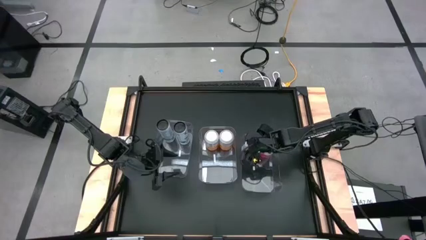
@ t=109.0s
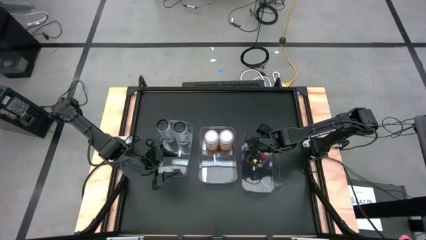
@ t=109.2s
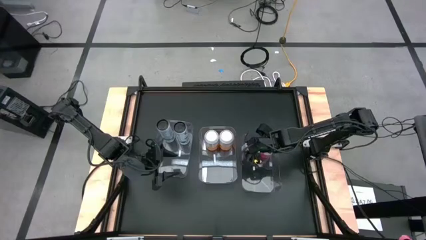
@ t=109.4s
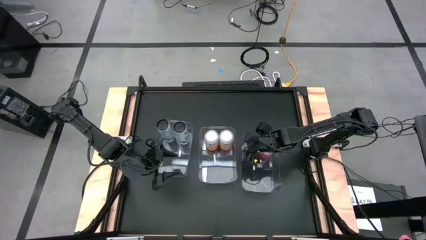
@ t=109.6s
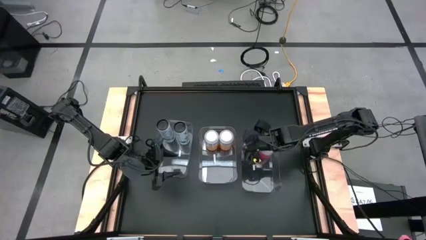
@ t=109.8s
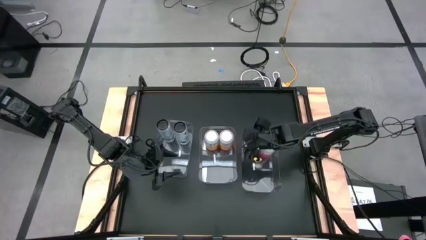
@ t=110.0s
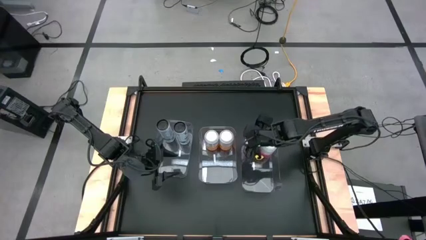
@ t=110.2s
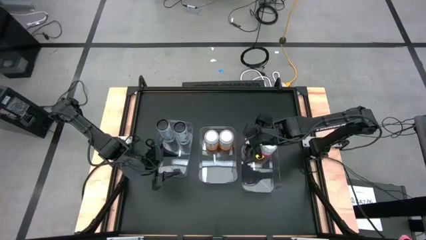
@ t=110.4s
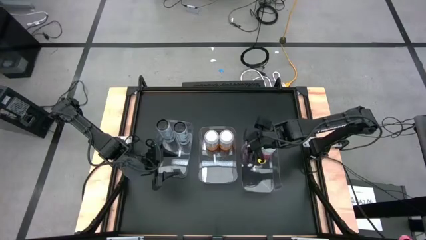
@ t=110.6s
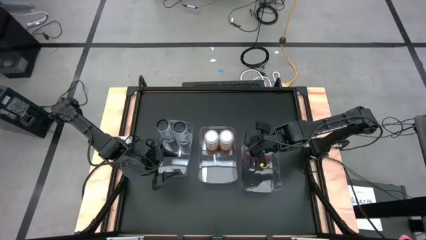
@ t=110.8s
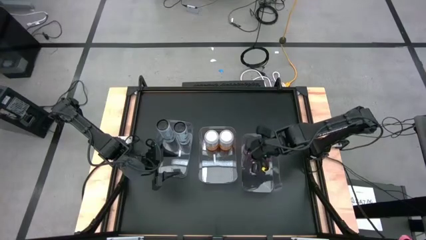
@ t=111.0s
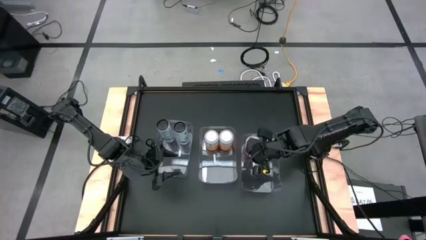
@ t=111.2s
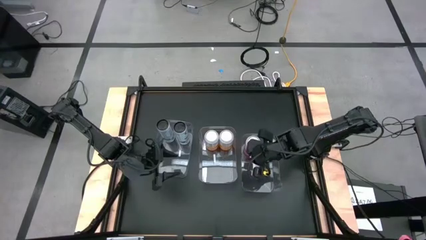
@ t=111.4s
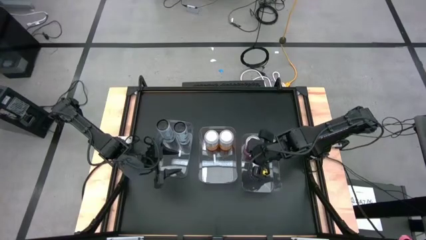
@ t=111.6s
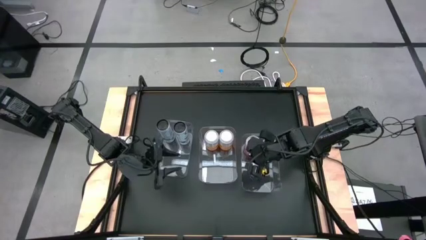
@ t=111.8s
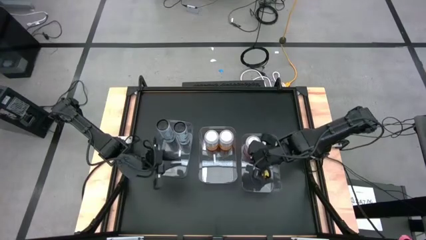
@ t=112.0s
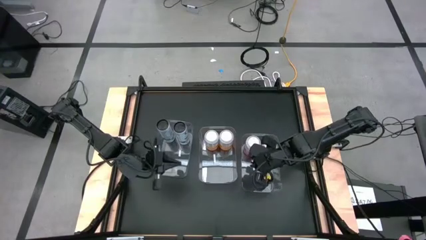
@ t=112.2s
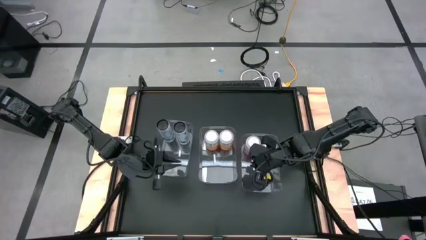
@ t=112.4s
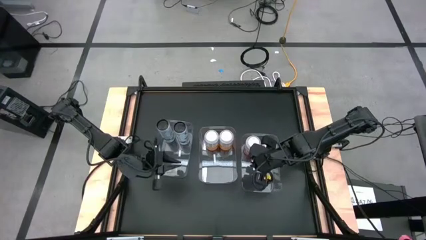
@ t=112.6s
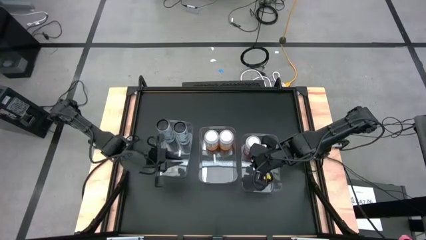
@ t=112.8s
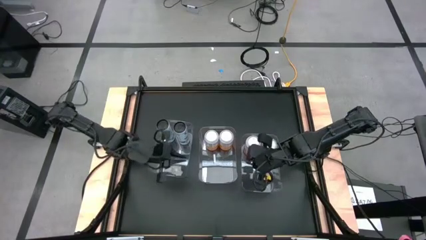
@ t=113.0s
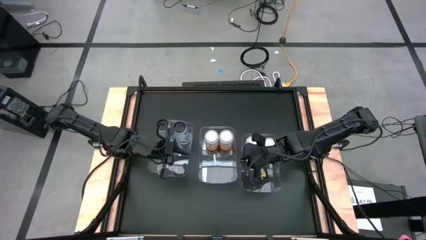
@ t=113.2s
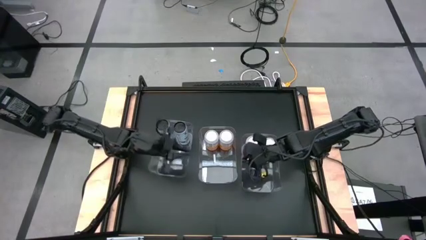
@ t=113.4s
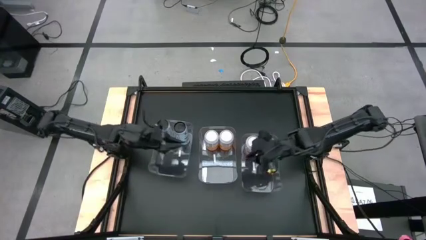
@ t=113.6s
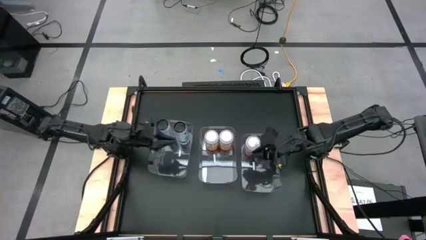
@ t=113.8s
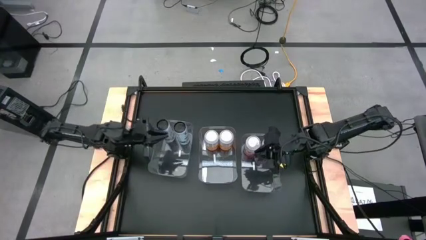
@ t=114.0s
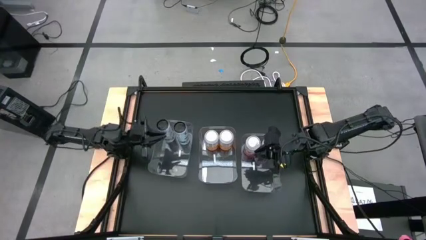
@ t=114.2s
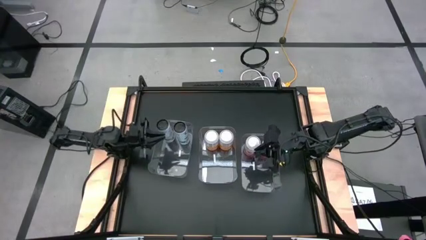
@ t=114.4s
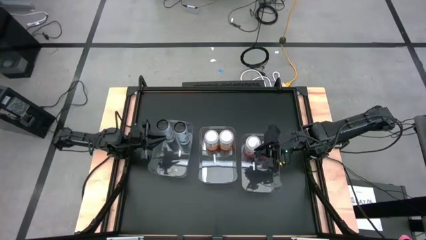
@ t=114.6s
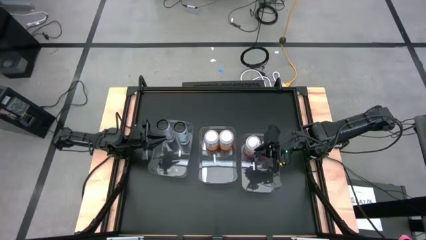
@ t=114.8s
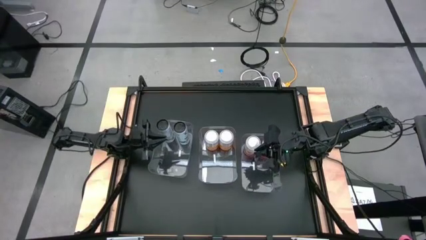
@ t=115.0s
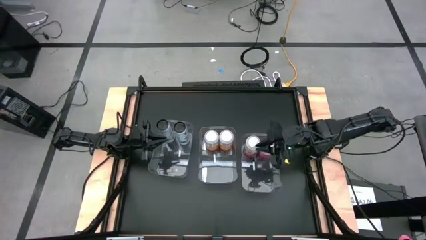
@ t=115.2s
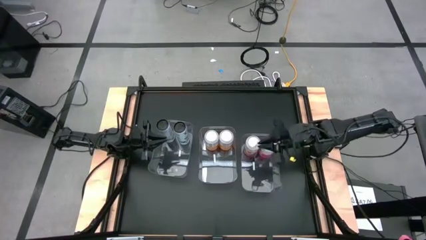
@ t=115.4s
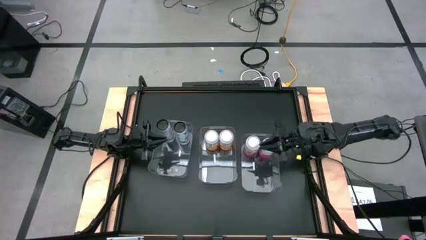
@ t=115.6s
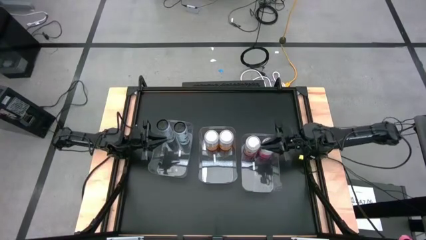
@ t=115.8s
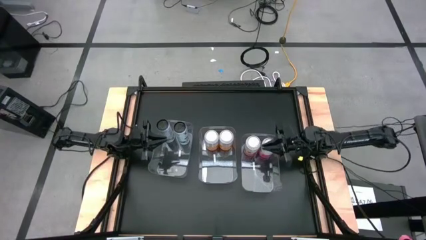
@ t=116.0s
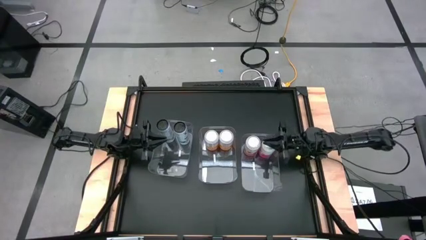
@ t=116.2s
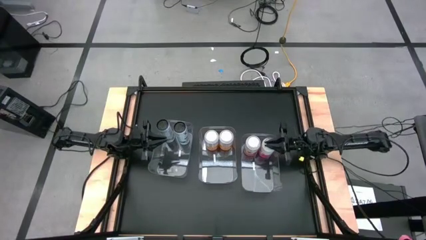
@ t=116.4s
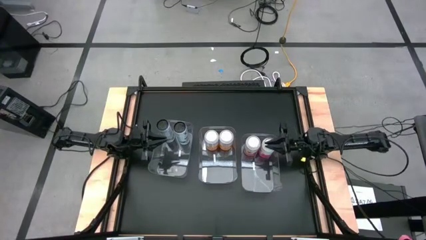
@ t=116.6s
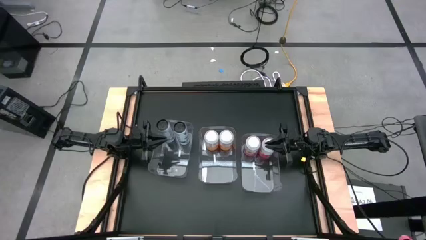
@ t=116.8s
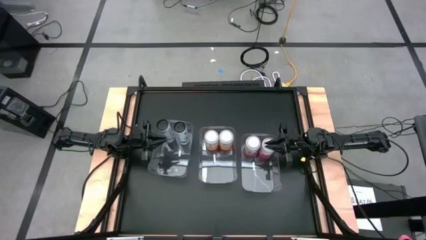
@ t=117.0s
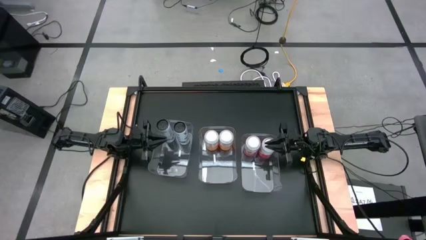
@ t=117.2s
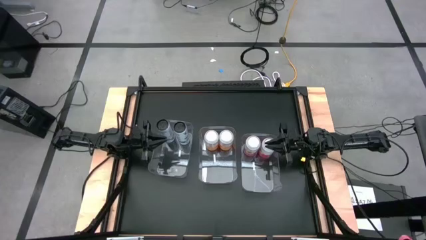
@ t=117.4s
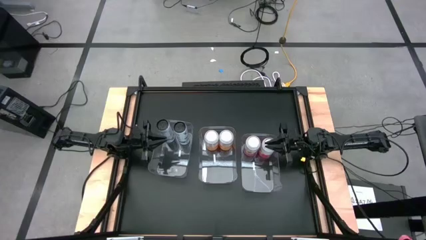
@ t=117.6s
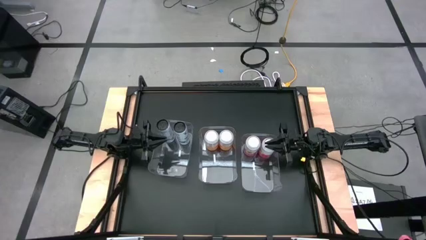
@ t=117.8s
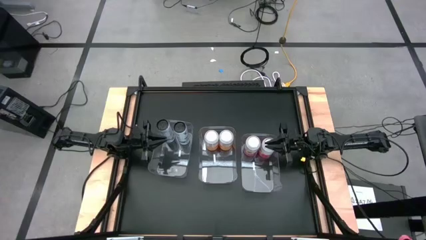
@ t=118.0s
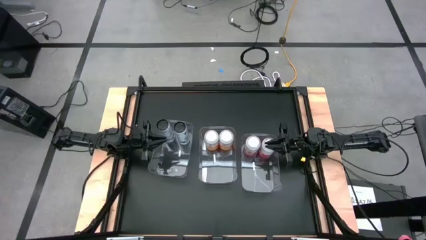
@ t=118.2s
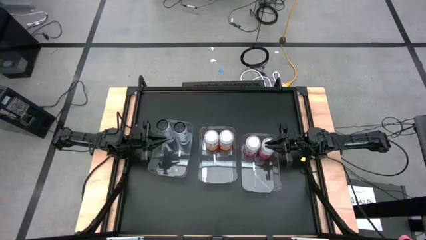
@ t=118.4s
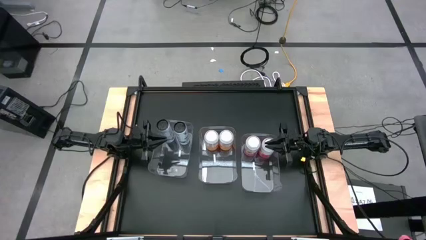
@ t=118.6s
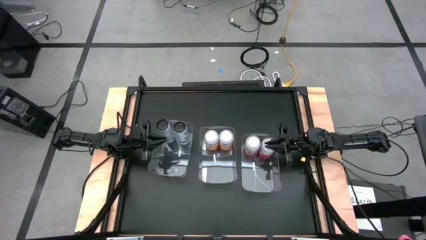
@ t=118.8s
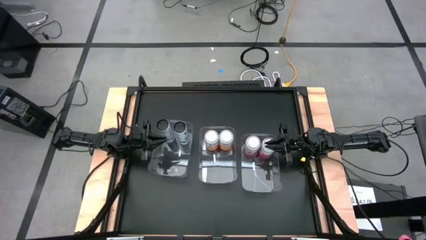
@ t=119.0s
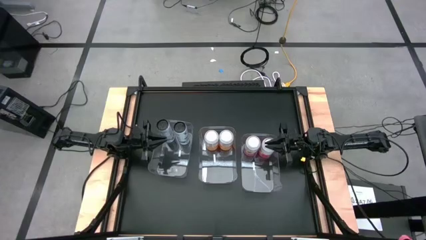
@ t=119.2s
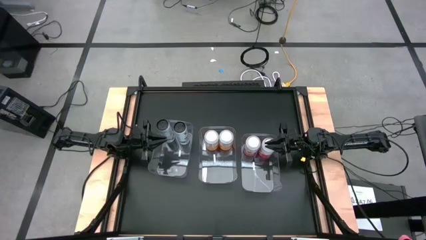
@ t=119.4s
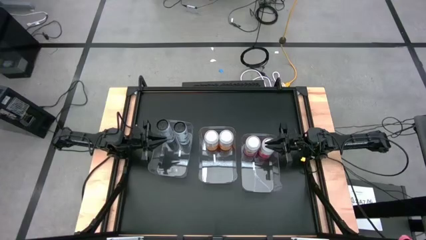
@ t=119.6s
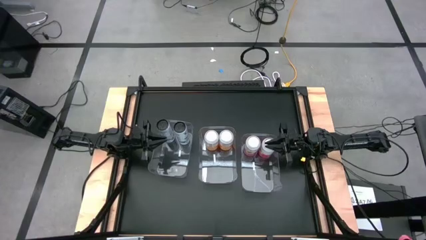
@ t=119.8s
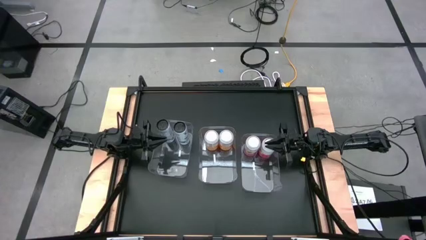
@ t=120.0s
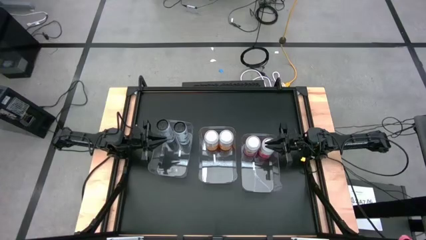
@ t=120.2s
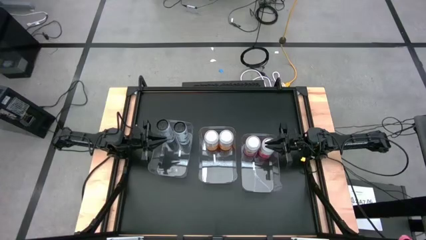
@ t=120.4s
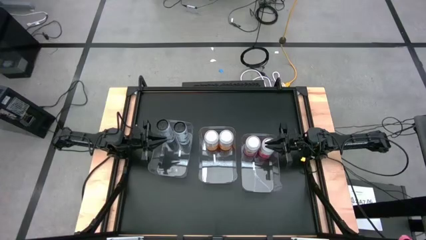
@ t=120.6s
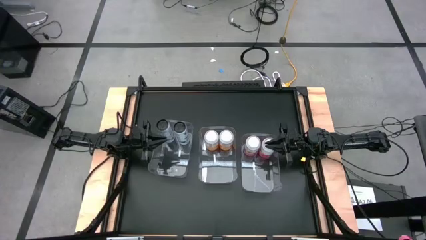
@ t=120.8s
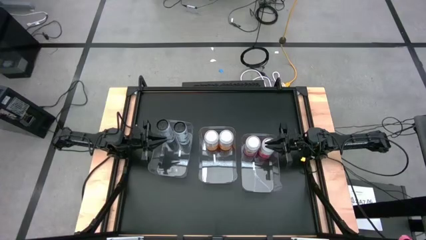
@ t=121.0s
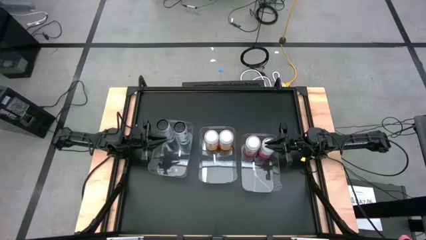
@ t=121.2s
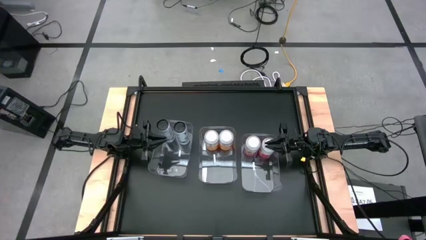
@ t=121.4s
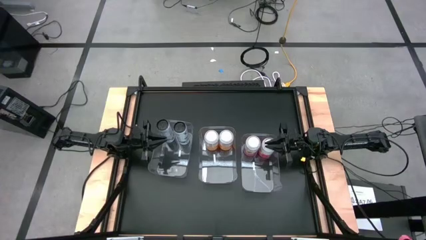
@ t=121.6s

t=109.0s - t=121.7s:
Task: Sort soda cans
Return to Home Position

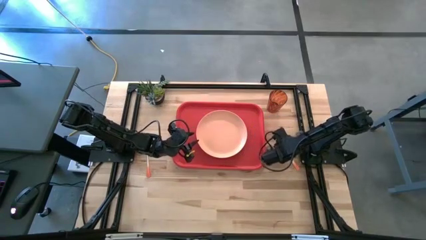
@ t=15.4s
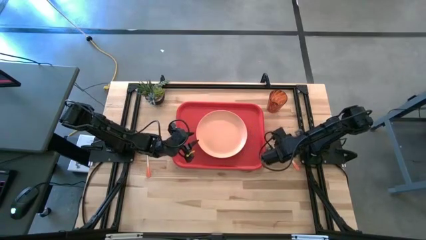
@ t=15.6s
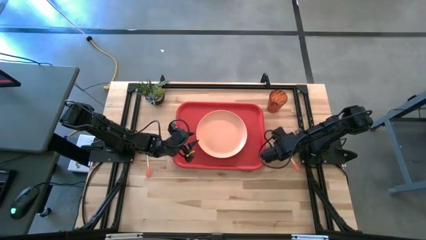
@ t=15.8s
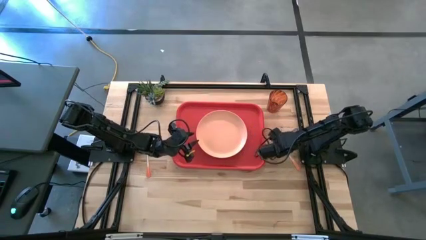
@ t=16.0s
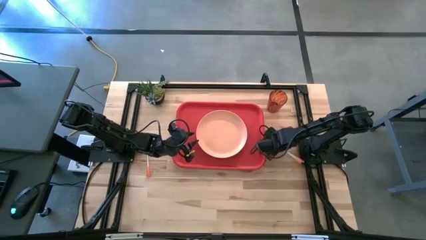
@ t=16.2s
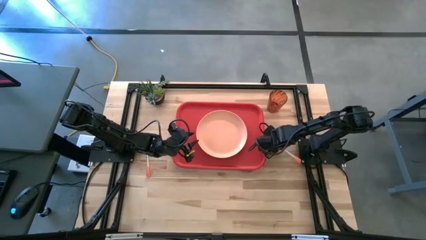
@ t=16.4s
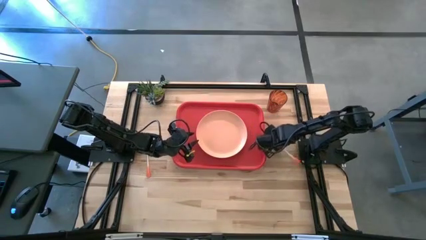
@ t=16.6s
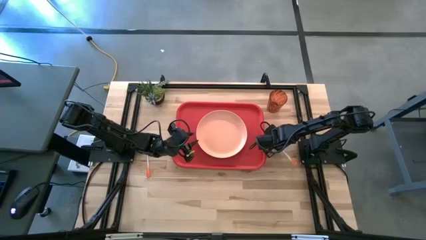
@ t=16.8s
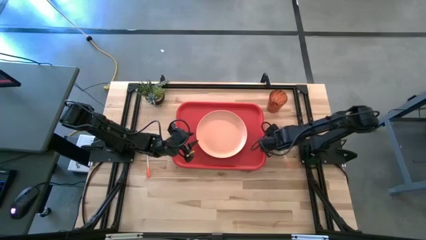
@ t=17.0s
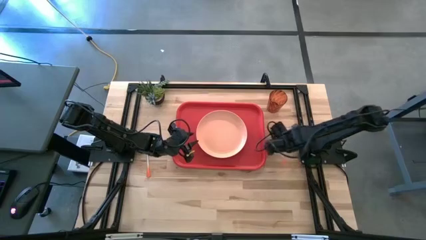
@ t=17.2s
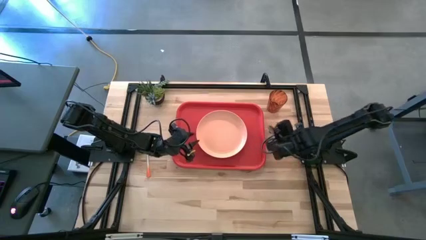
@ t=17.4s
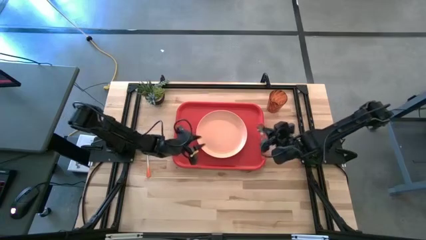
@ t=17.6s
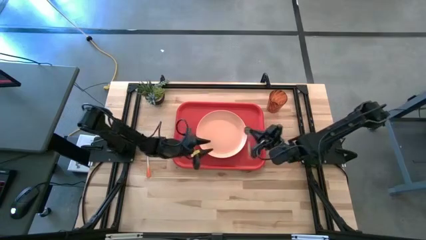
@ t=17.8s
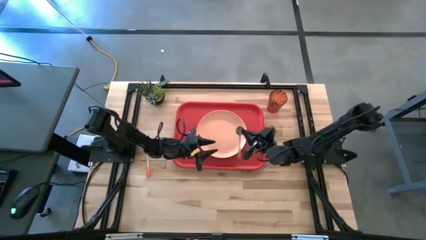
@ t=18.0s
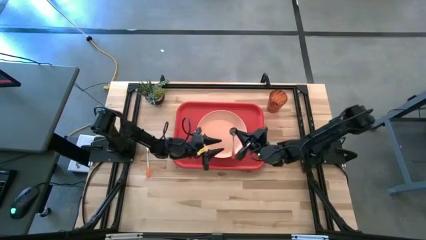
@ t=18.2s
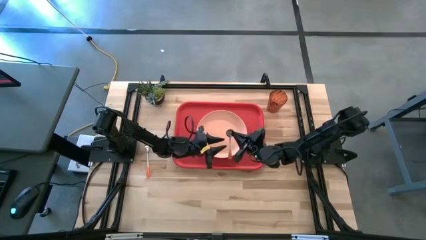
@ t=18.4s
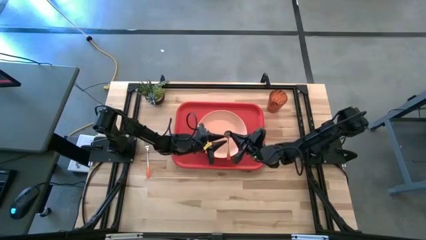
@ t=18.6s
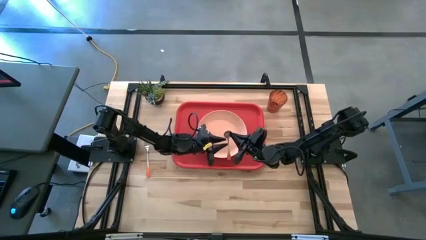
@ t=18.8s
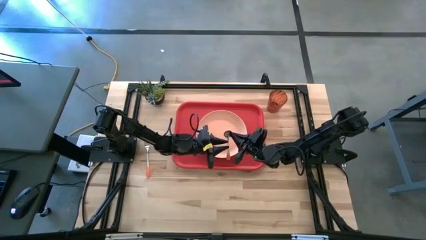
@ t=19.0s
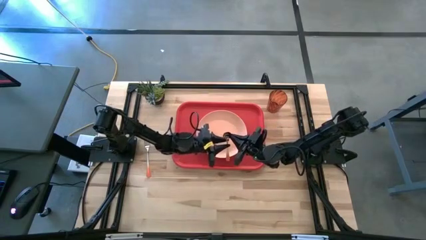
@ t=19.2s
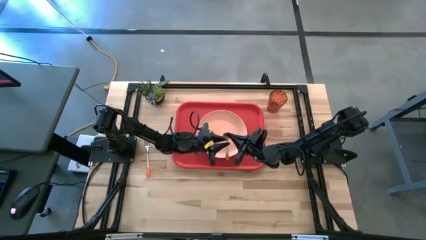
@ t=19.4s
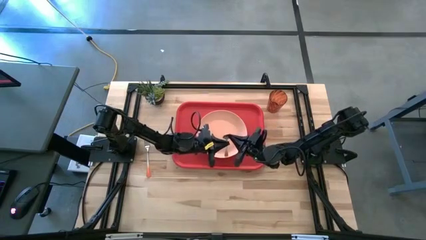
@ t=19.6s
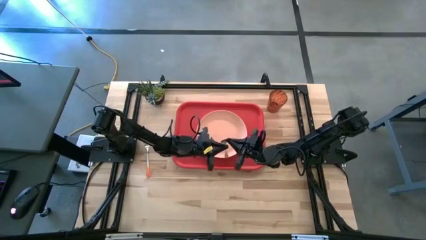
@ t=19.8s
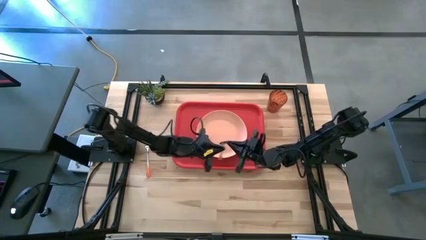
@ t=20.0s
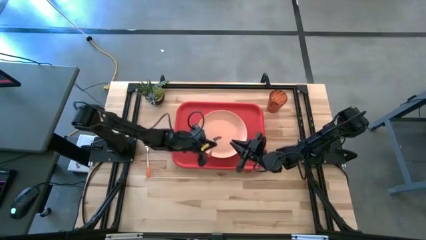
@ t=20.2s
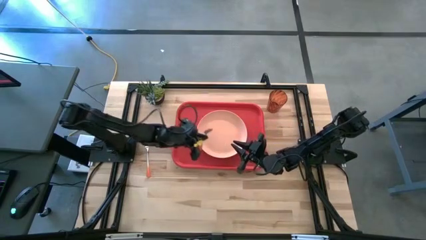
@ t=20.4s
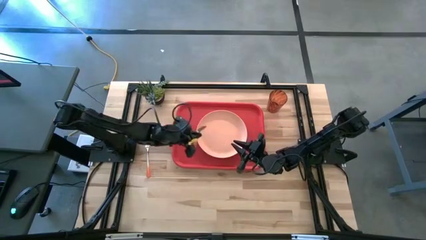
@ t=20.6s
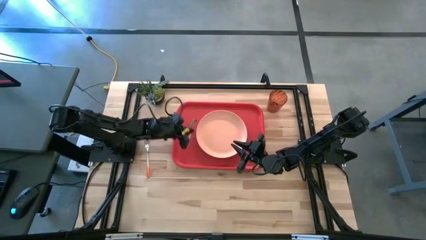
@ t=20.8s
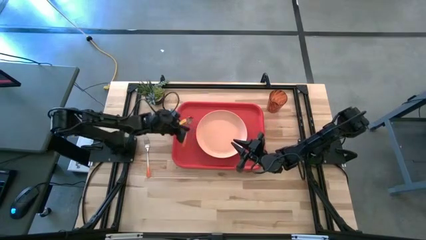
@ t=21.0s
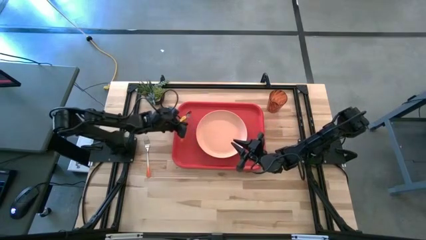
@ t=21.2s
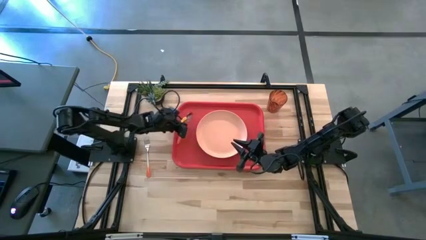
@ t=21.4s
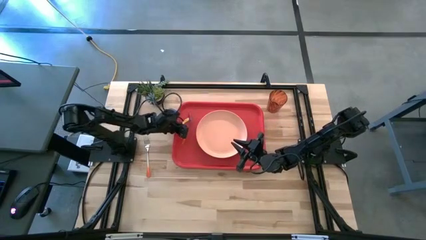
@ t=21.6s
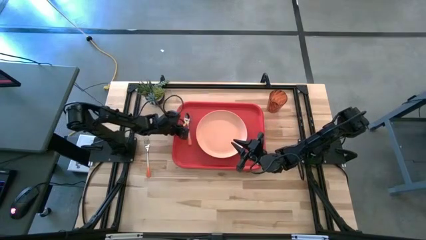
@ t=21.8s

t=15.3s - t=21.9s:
Task: Pick and place plate/cup/fork/spoon on tray
Put the orange spoon on the red serving tray
